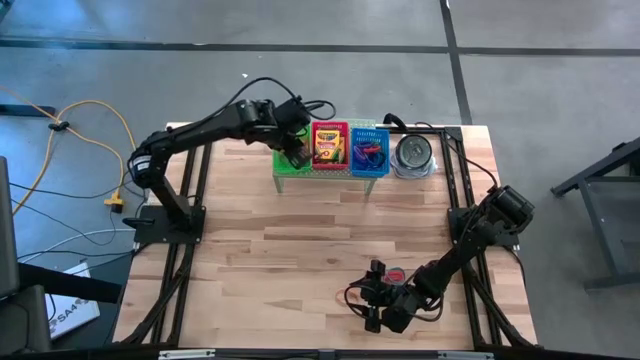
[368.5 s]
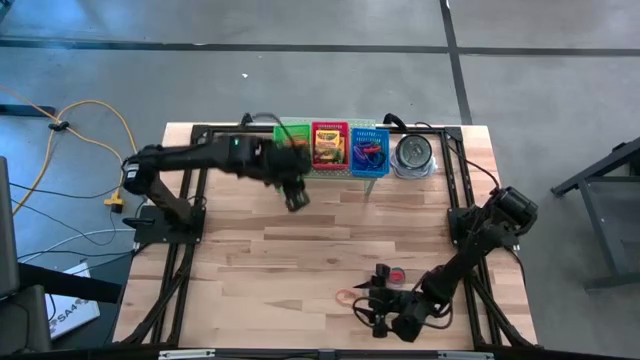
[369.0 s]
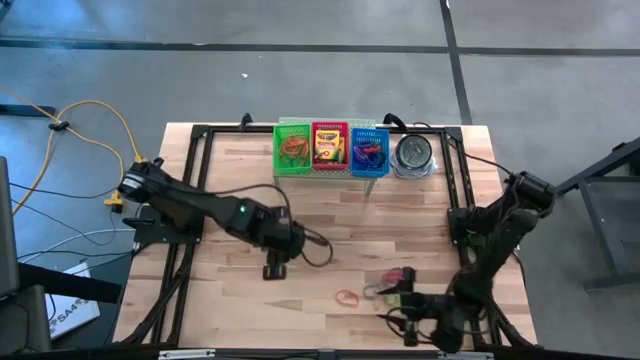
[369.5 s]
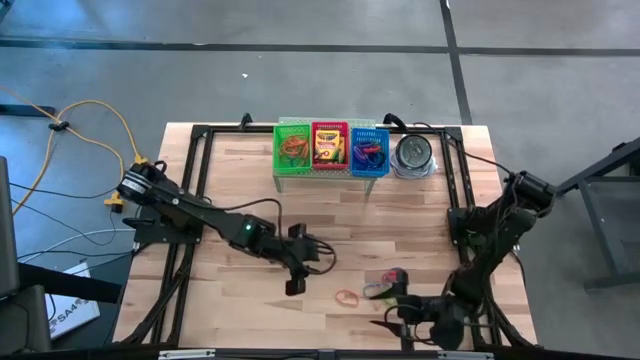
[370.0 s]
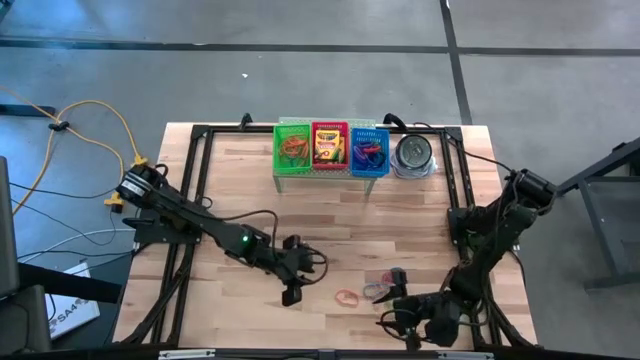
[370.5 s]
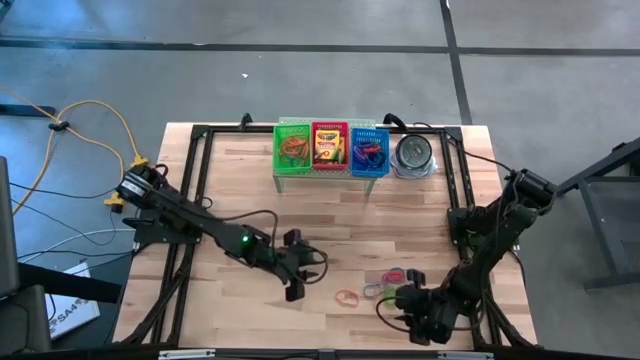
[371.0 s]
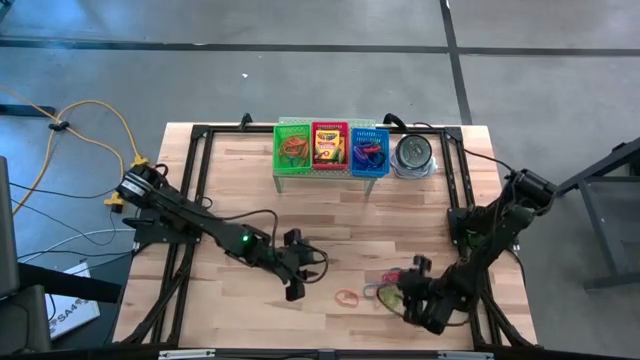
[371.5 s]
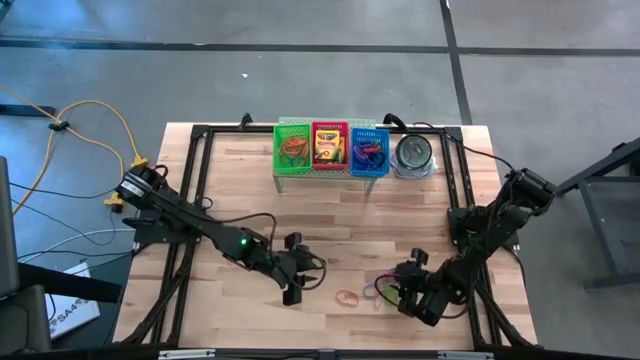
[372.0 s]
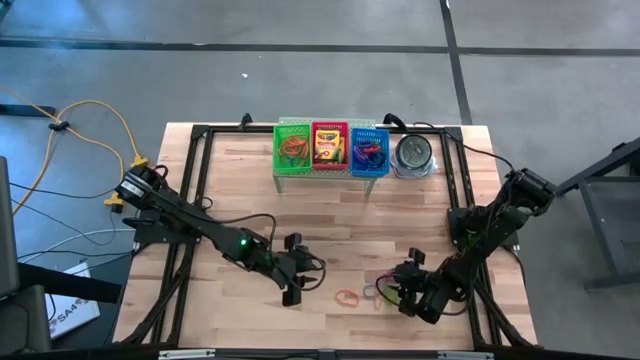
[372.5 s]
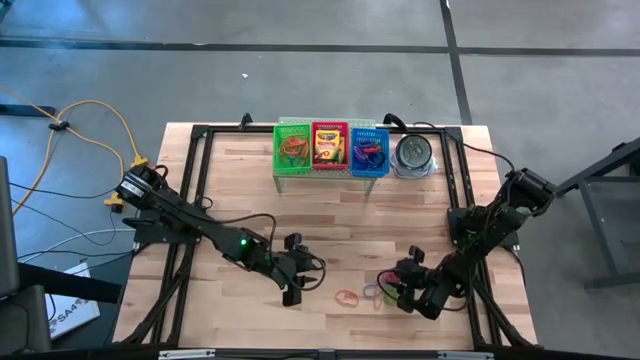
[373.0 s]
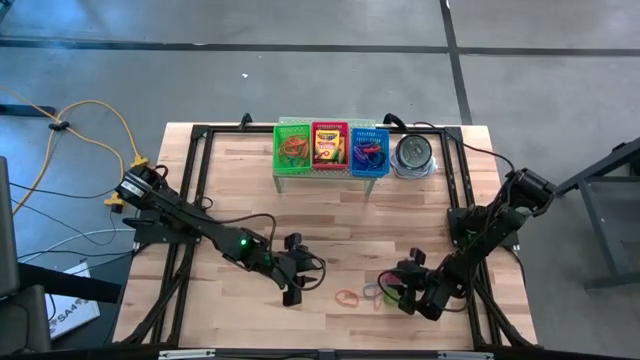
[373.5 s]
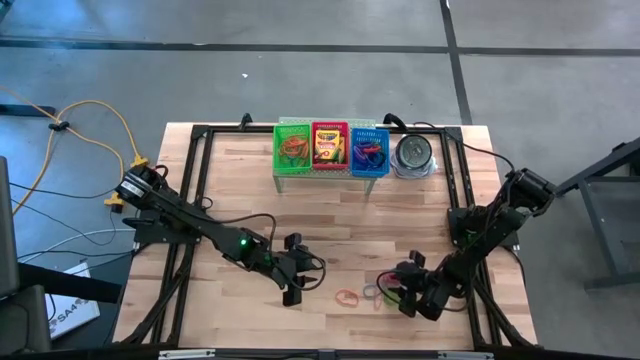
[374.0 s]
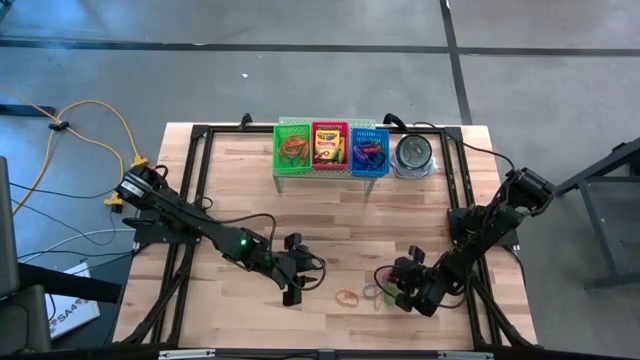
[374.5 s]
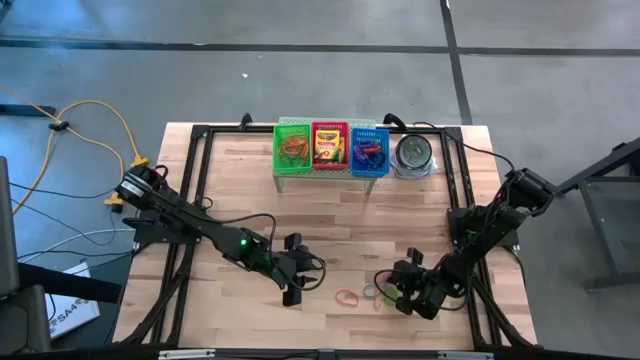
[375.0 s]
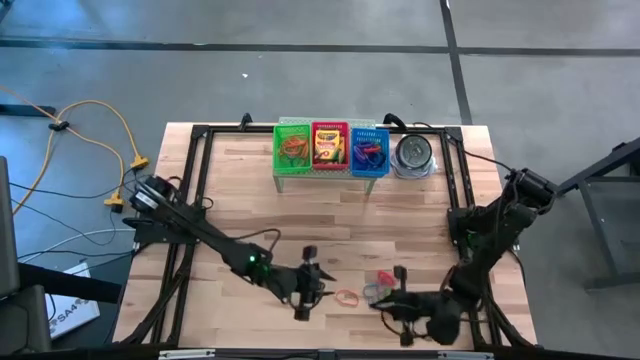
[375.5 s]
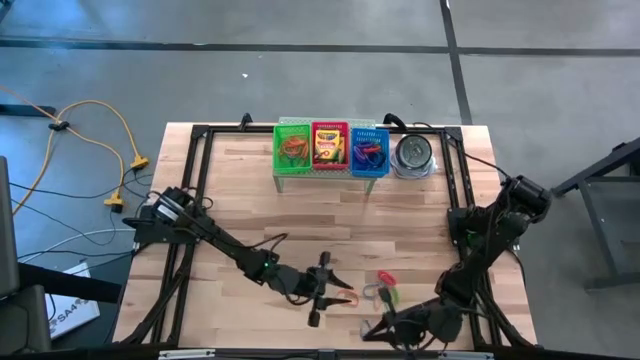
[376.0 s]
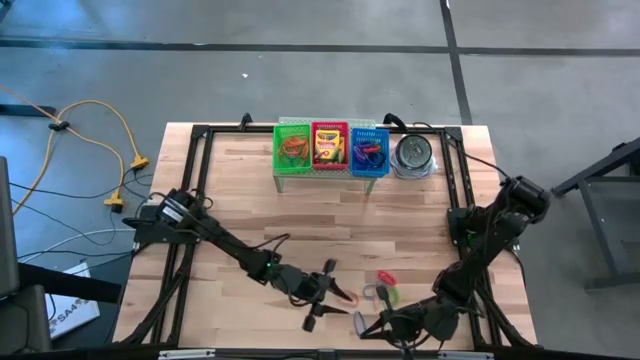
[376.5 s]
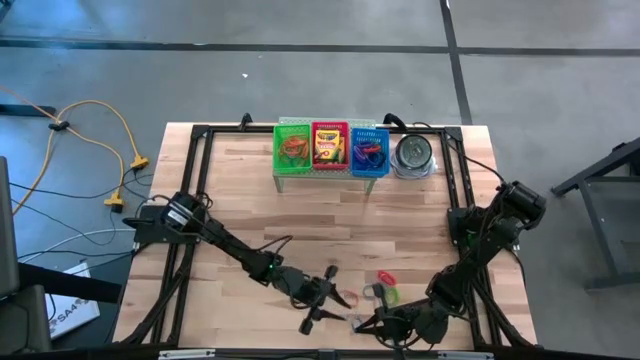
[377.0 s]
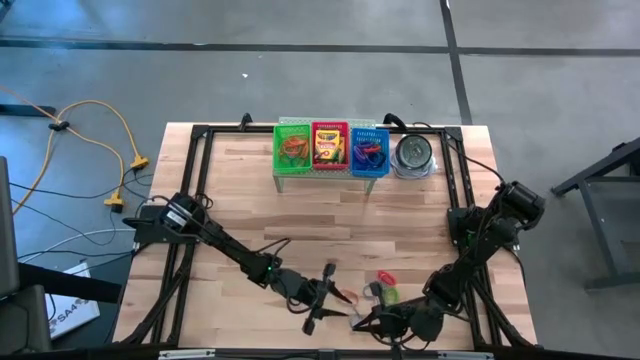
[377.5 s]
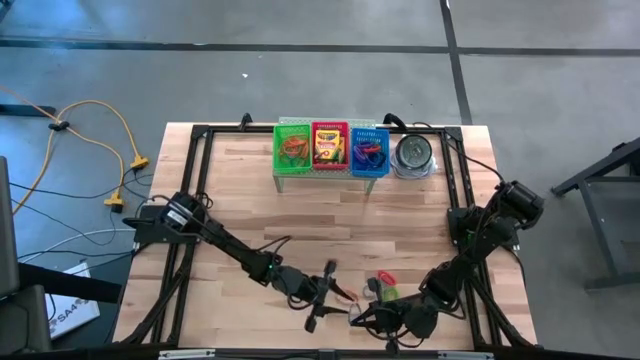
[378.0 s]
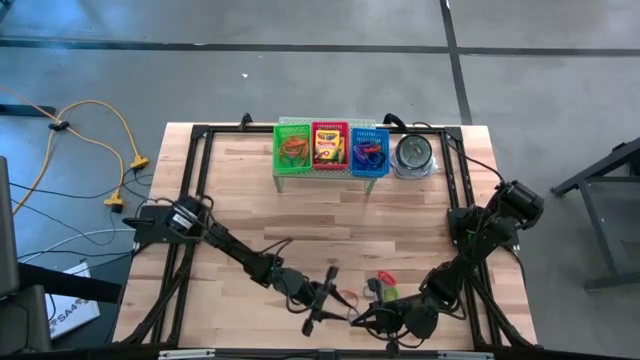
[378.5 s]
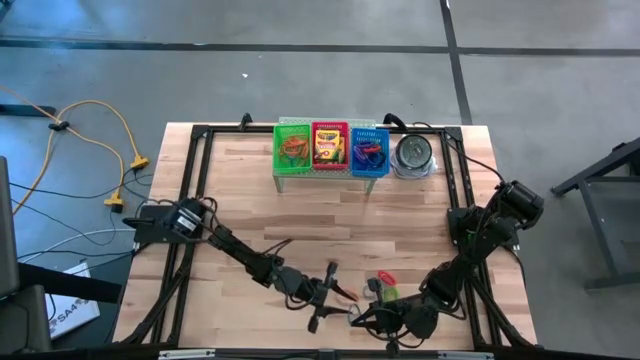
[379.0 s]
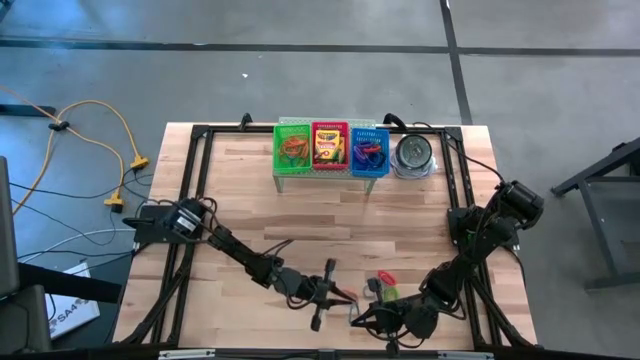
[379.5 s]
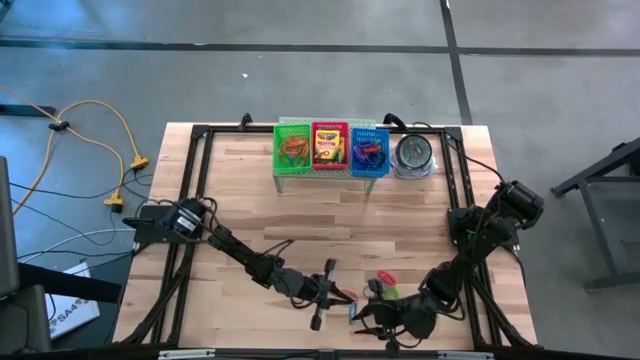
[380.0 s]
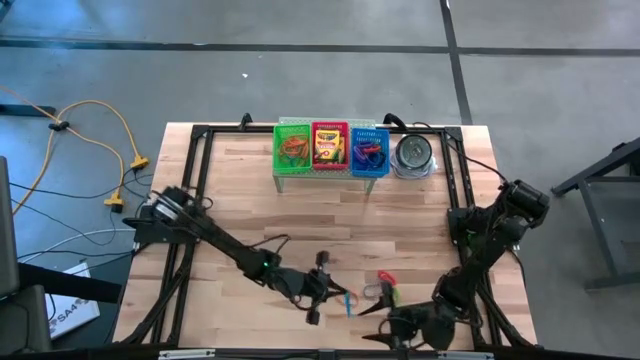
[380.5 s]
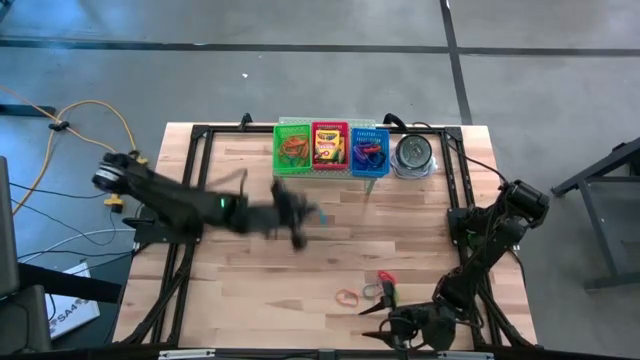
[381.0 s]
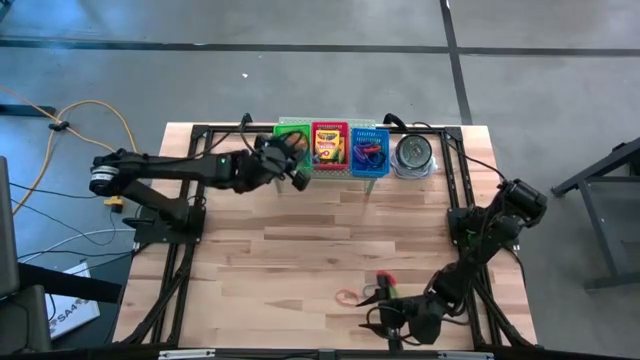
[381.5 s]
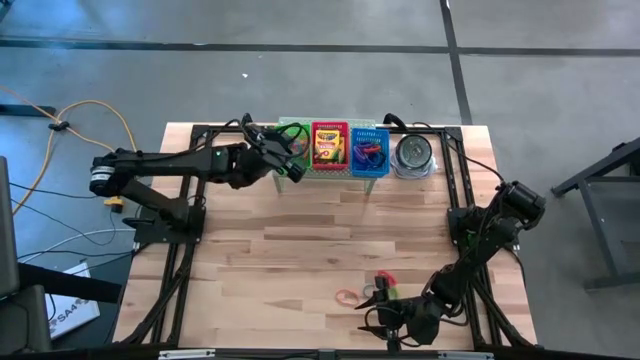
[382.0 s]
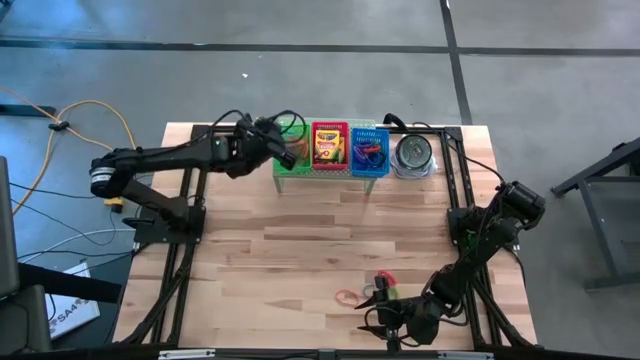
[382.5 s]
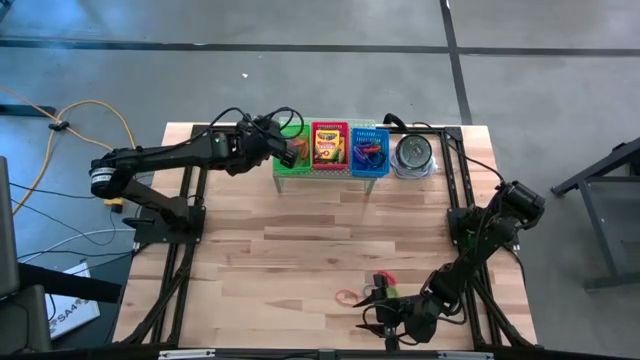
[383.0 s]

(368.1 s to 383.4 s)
Task: Pick & Place Office Desk Supplies
Put the right blue rubber band into the green bin on the shelf

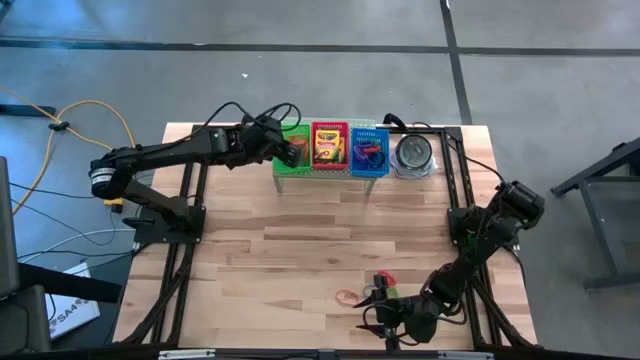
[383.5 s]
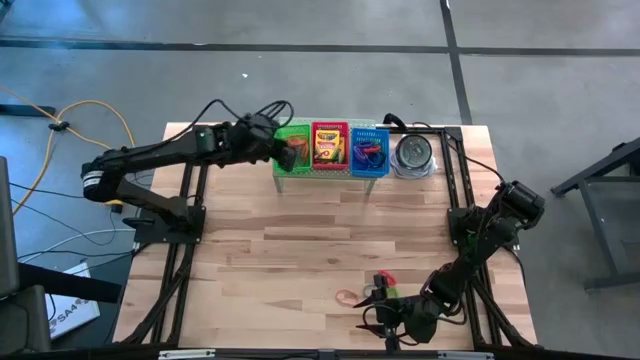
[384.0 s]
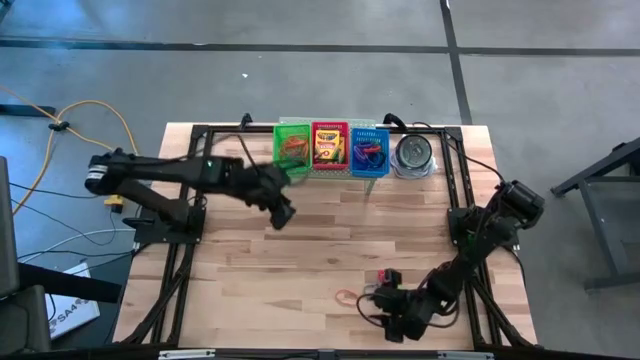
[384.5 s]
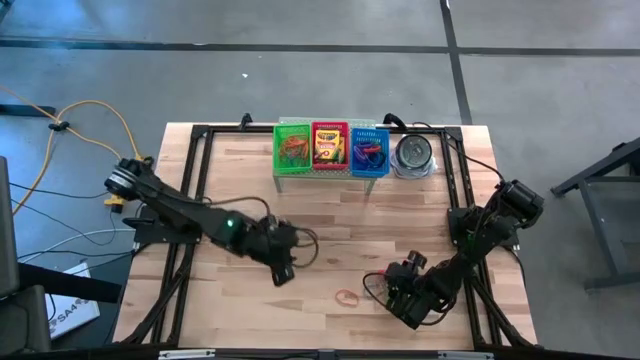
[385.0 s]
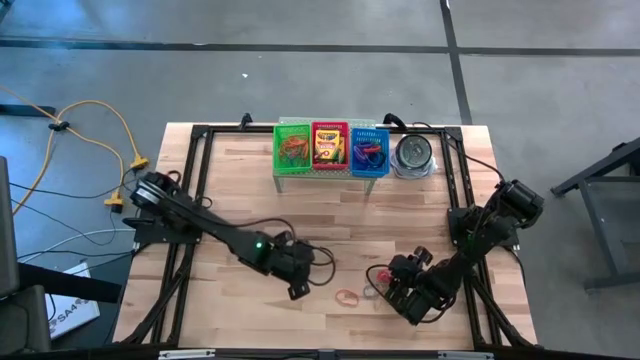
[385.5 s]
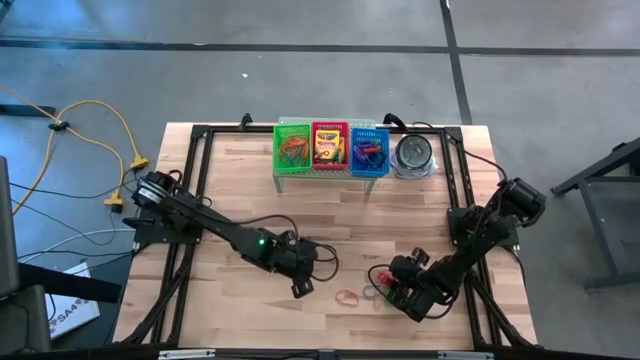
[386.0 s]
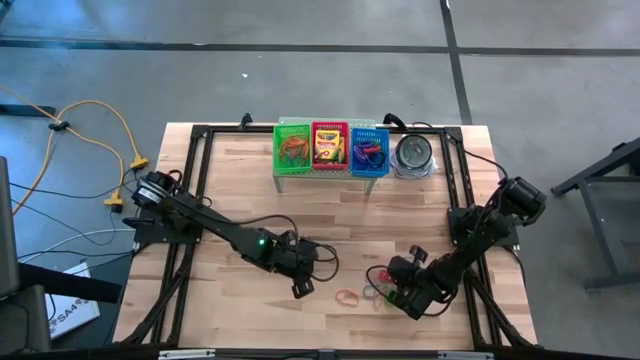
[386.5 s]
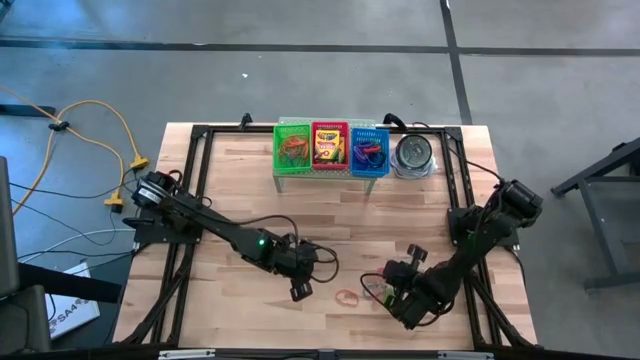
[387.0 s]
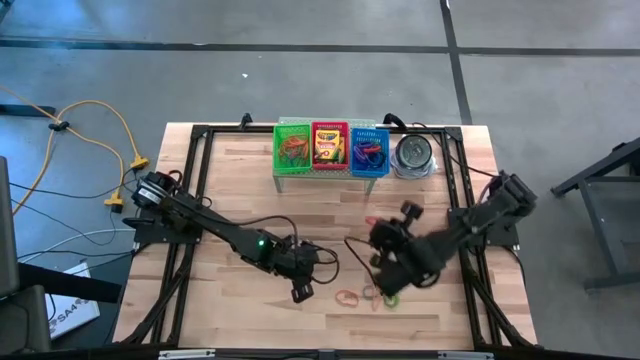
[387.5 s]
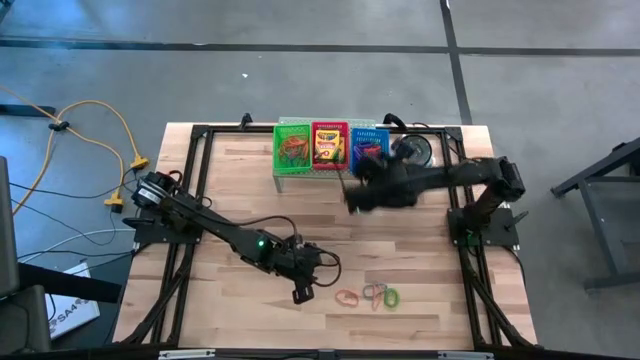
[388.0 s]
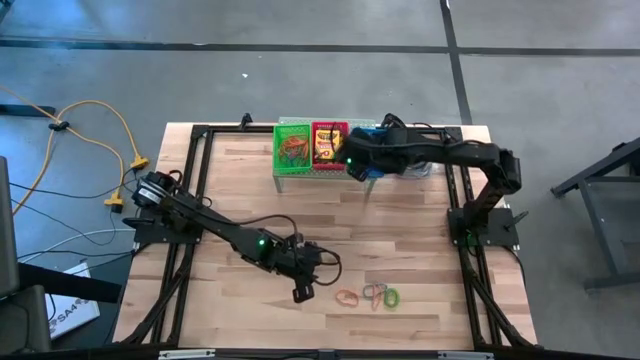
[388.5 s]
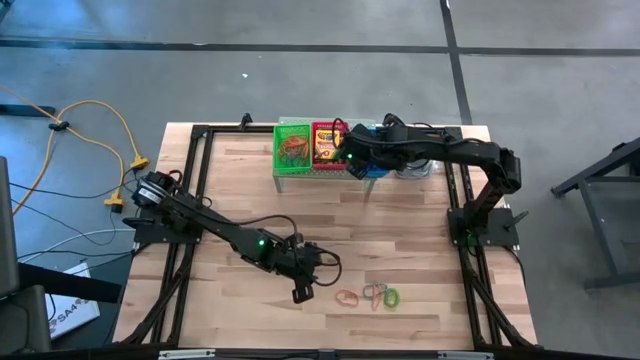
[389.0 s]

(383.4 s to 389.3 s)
Put the orange spring keychain into the blue bin on the shelf
